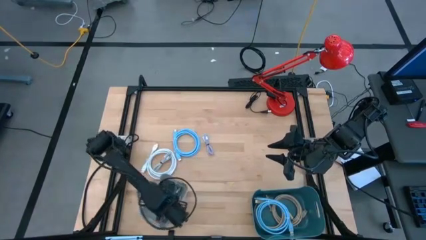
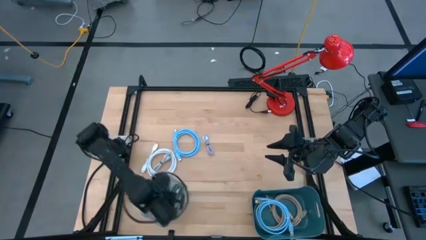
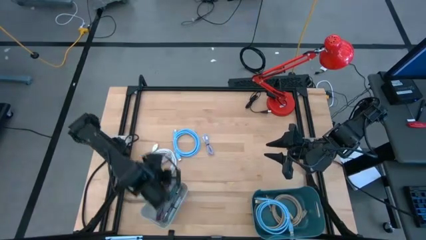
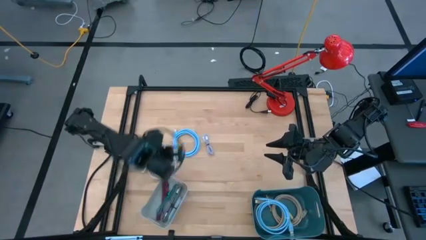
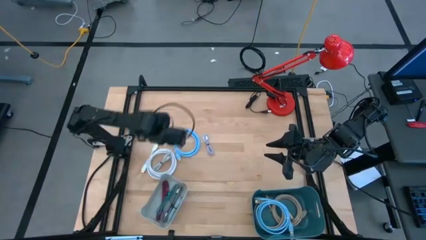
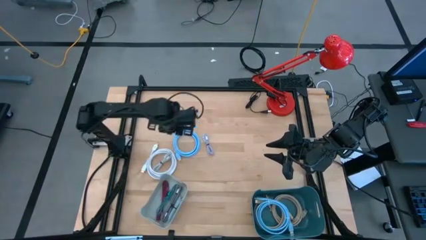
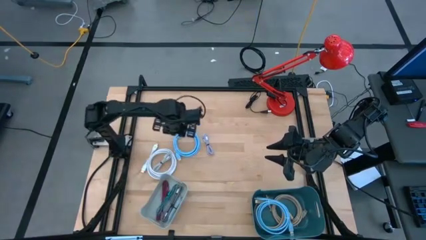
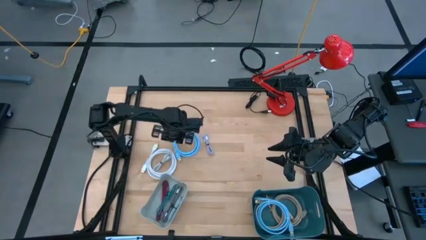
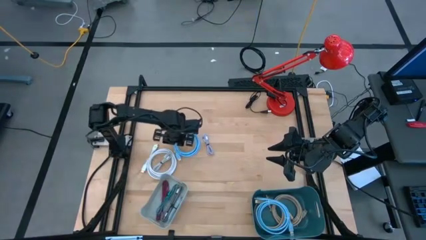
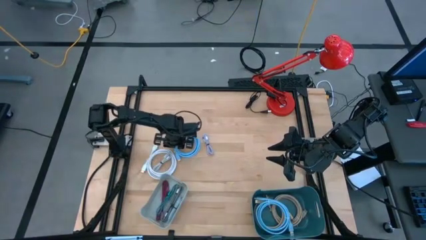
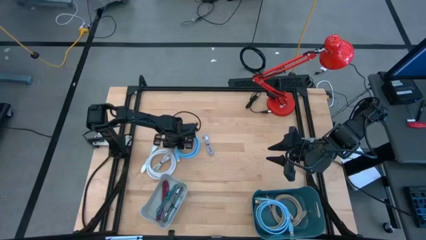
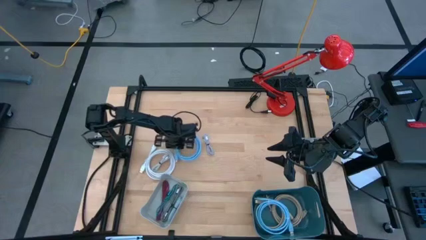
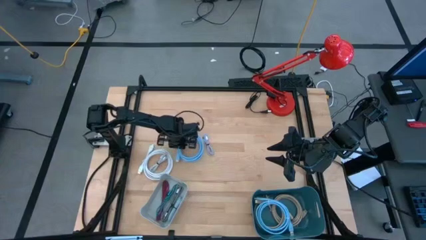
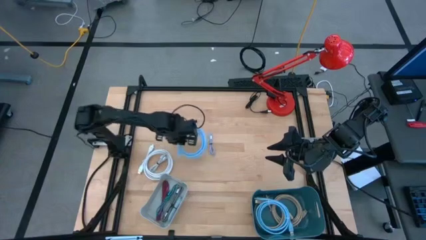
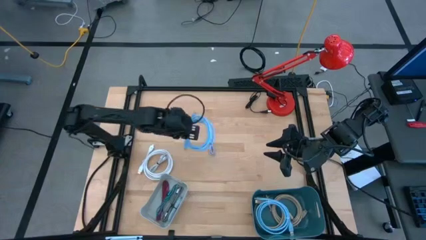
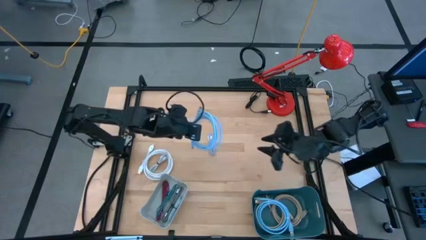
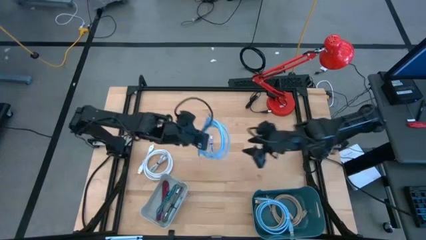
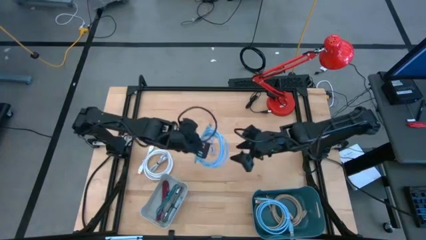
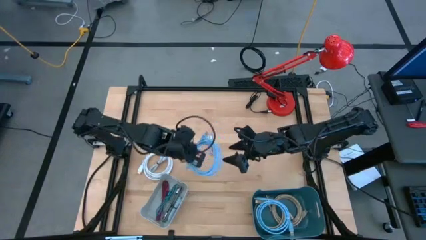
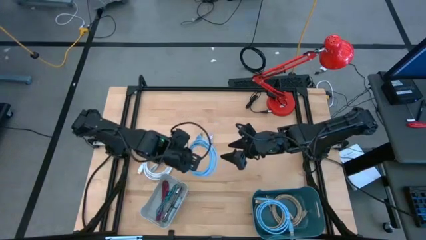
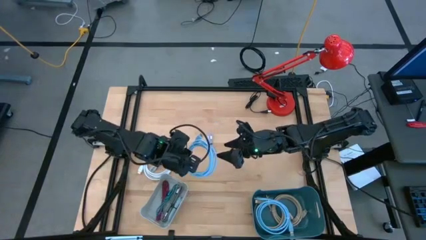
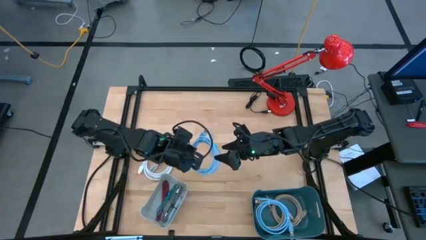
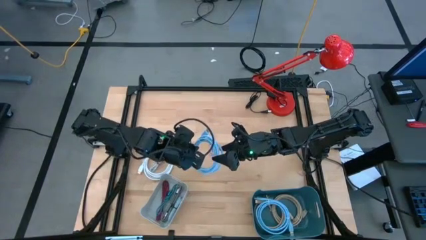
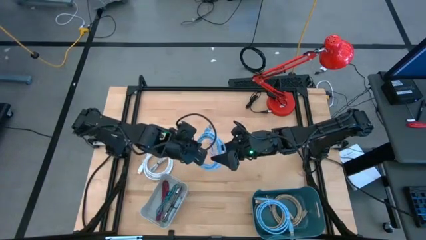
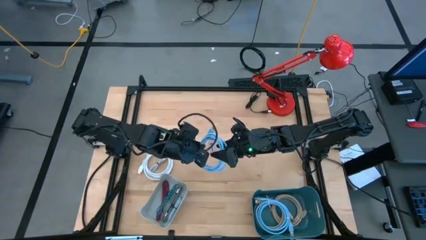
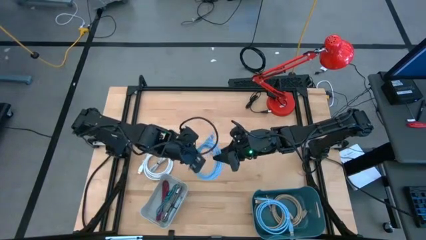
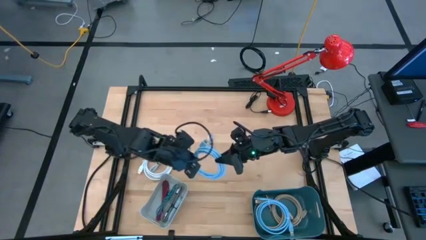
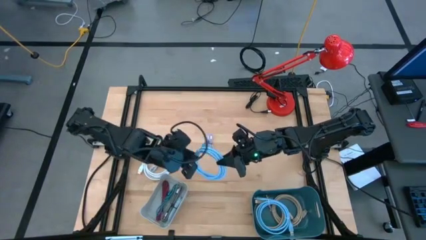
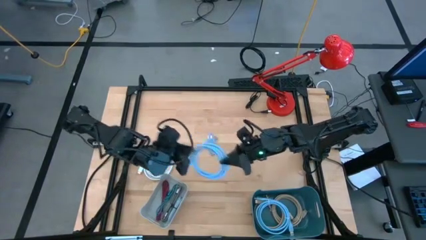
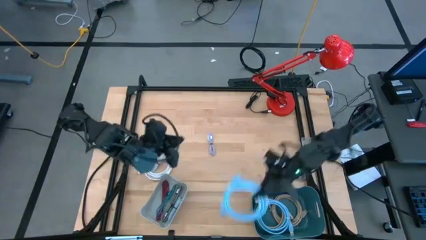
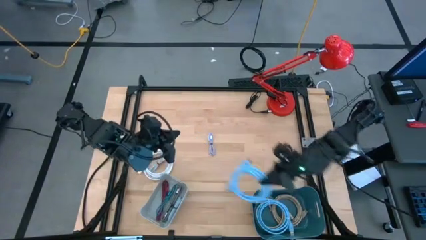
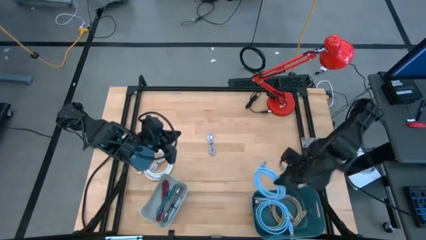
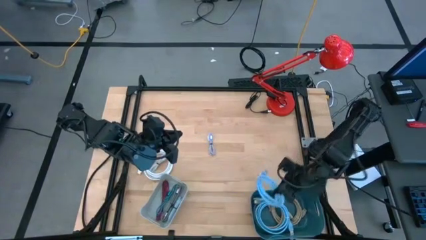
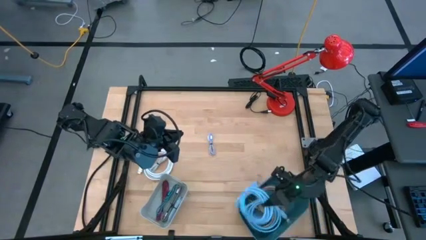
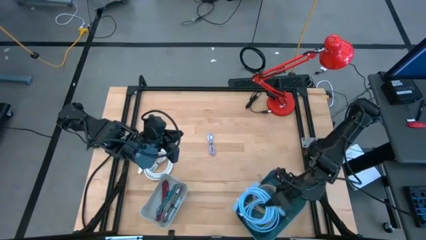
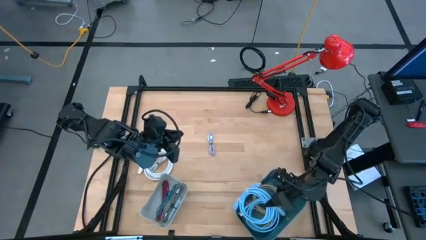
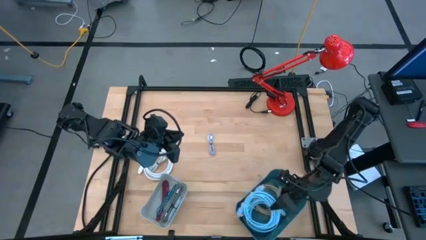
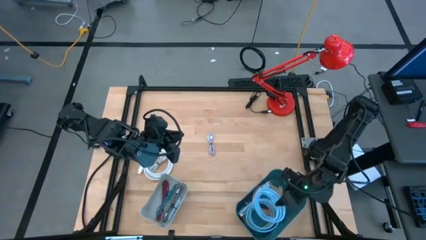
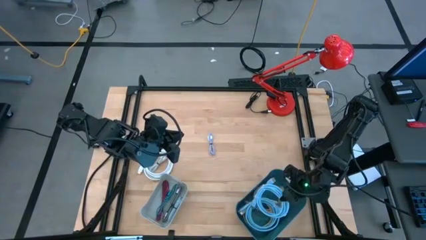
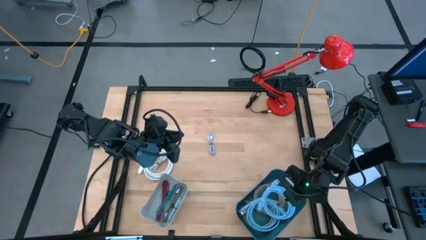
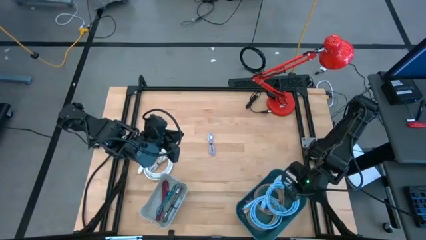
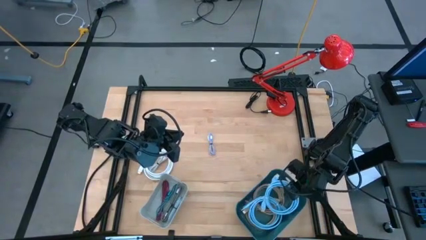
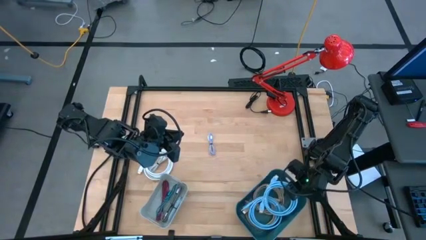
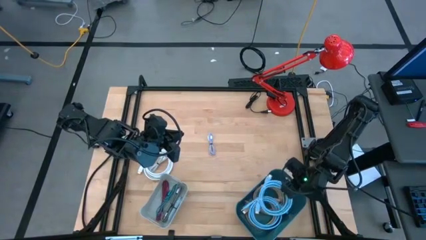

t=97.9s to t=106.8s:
Task: Pick & Place USB Port
Put the light blue display cable into the blue bin

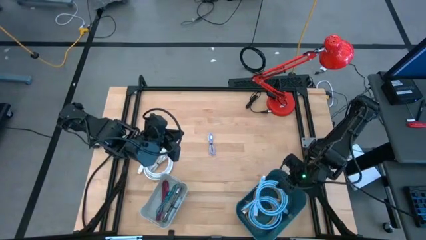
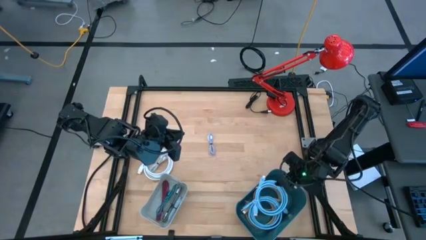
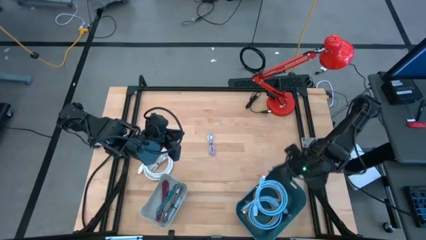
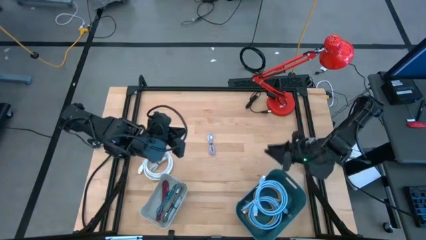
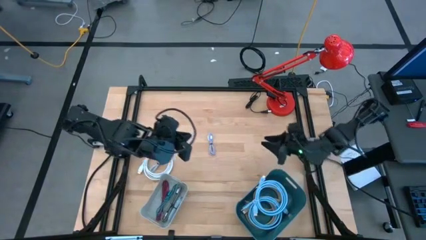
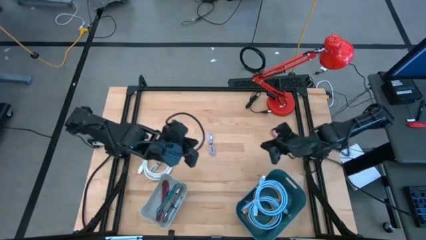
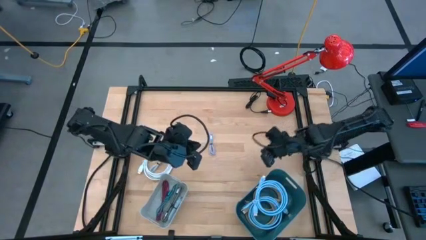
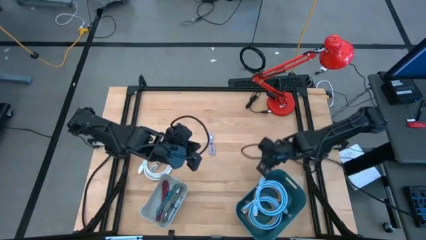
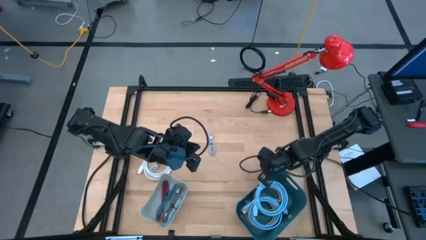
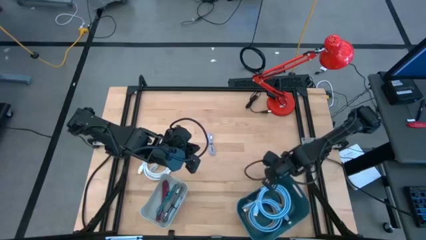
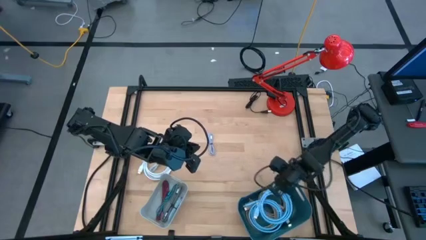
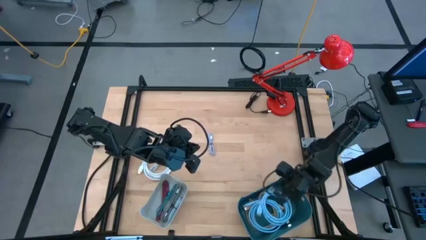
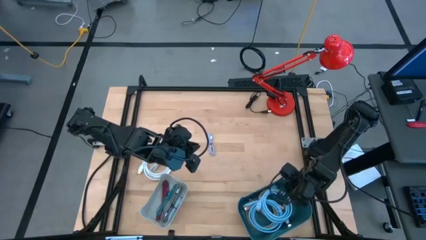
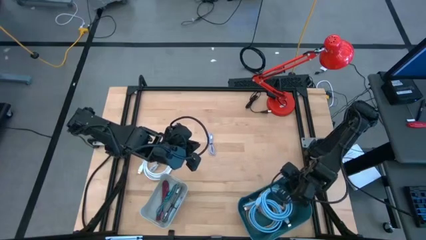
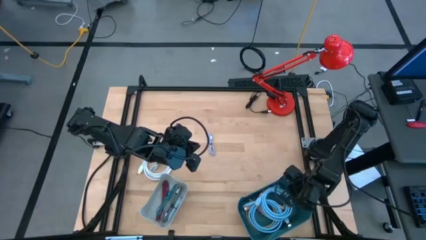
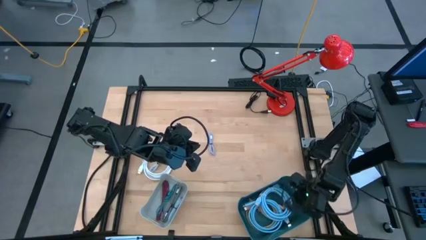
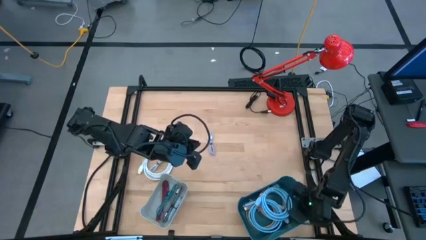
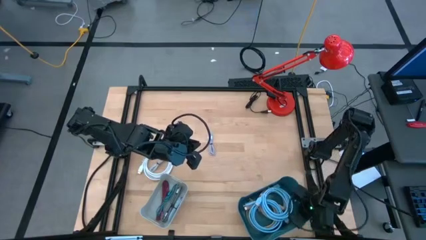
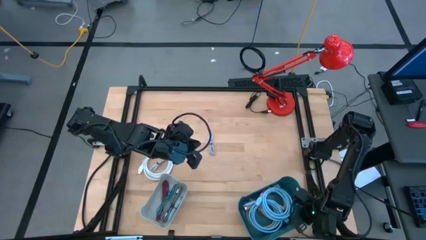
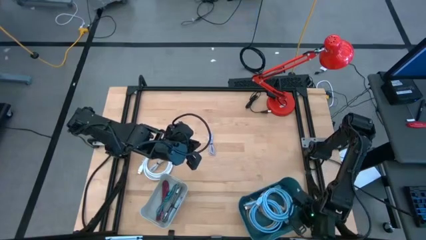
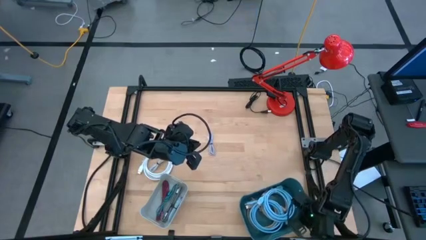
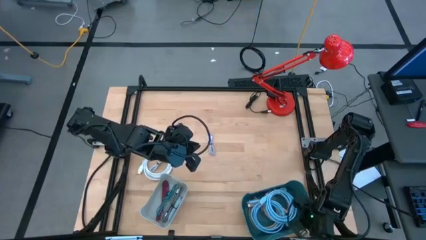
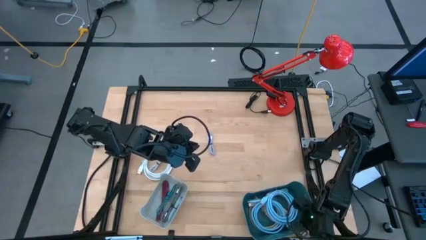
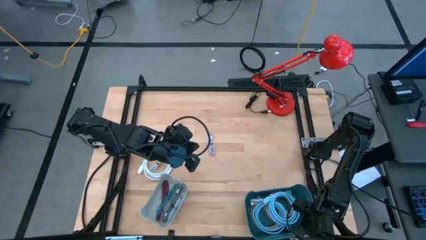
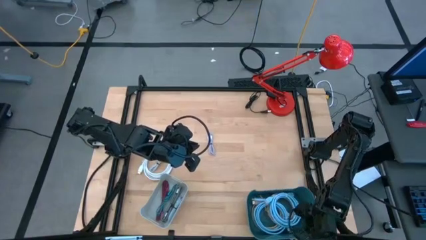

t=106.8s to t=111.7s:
Adjust the blue bin

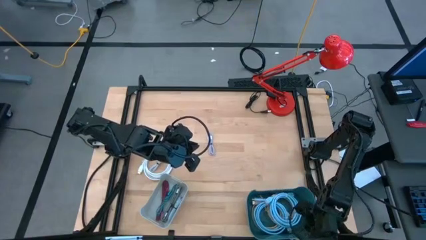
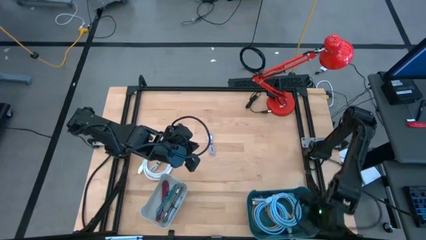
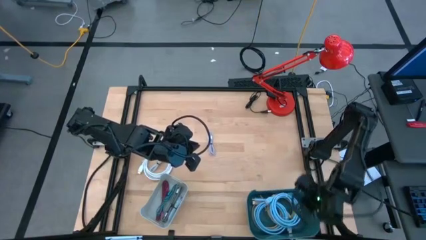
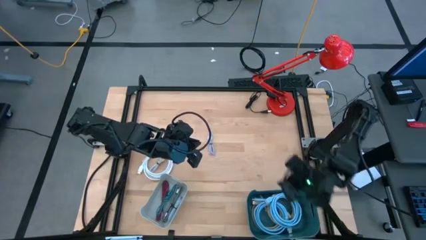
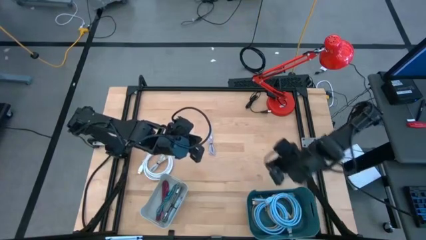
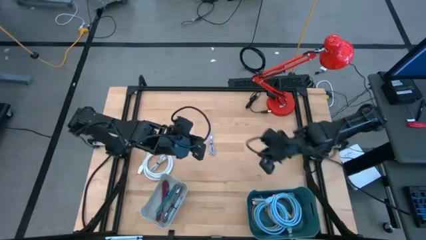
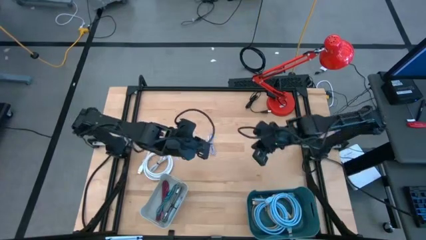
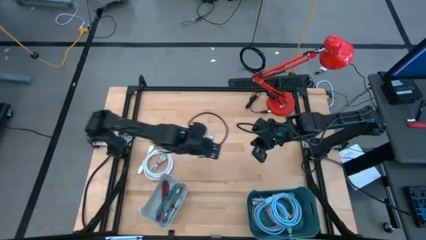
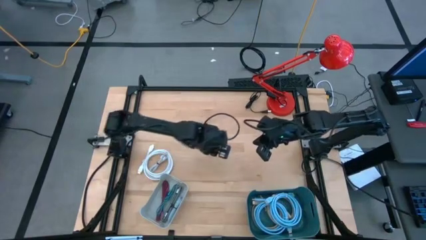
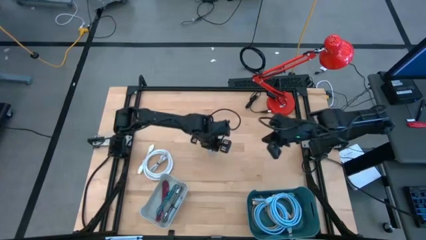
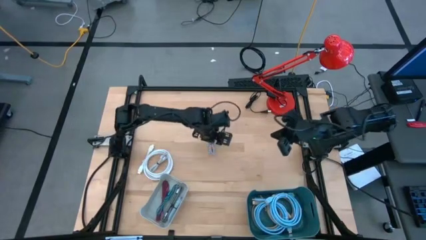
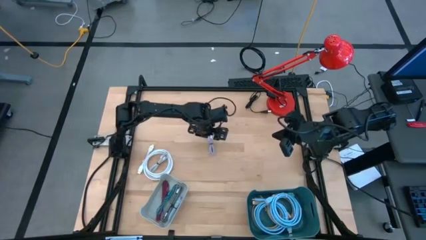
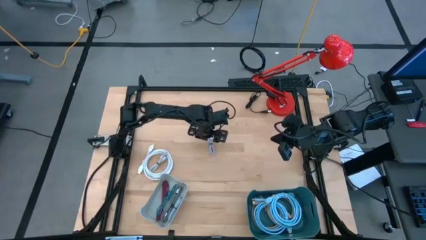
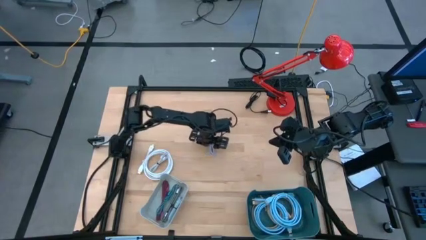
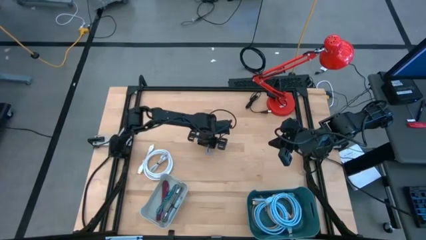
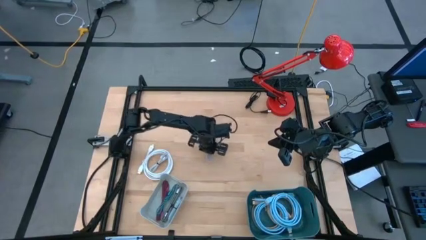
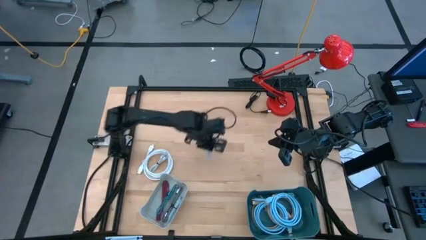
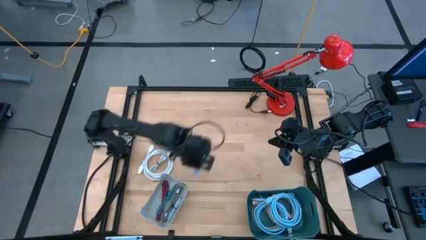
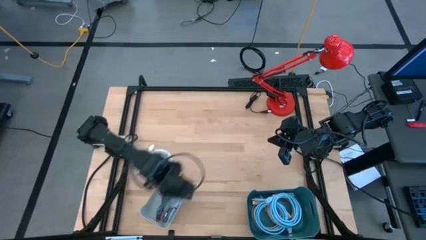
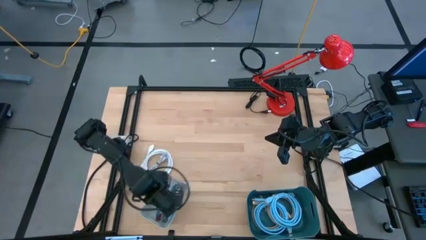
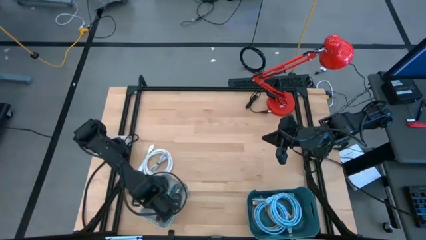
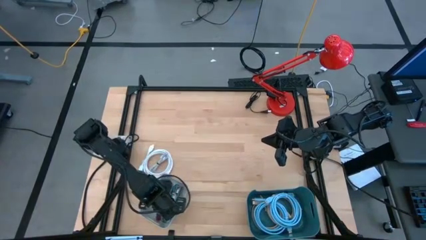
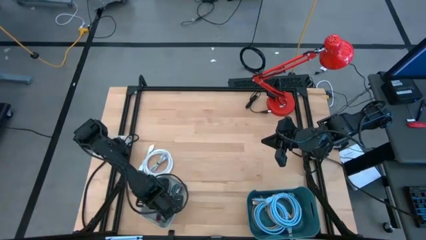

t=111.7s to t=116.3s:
Put the right white charger cable into the gray bin
